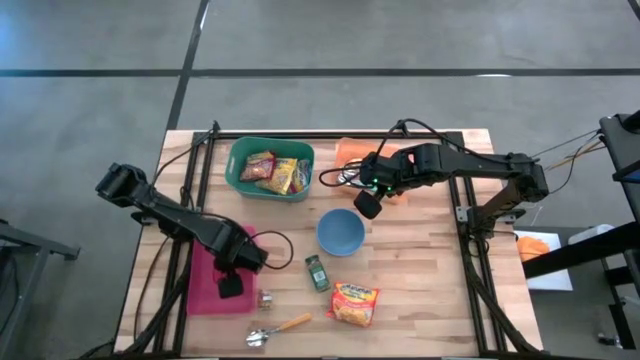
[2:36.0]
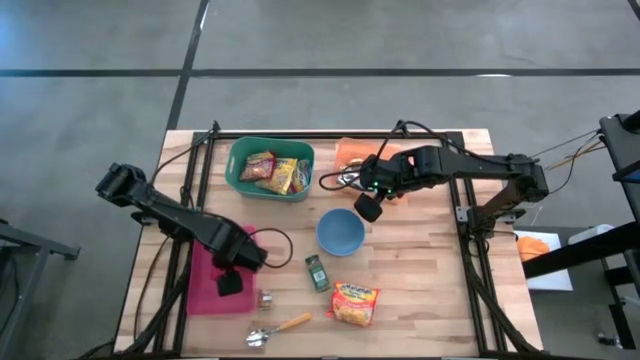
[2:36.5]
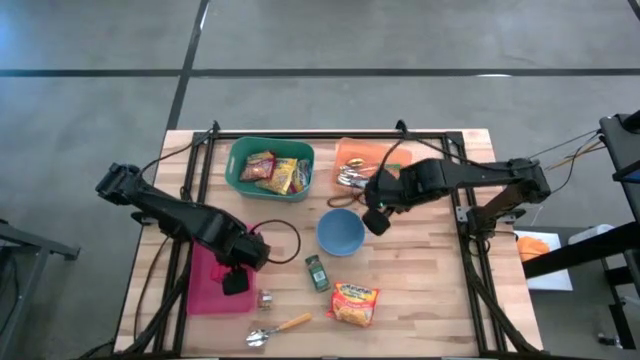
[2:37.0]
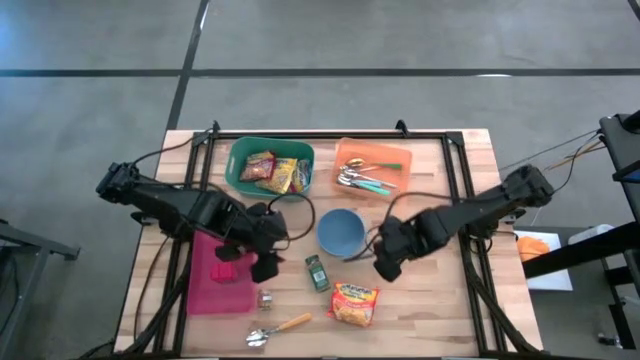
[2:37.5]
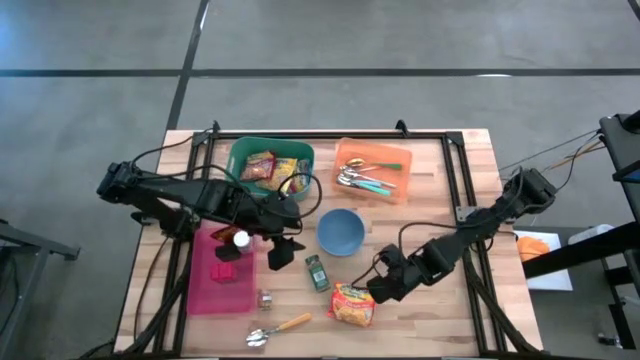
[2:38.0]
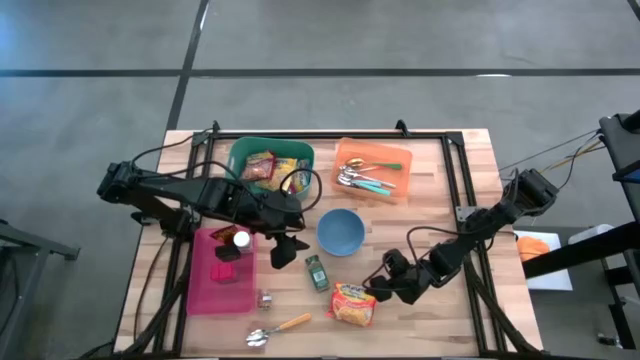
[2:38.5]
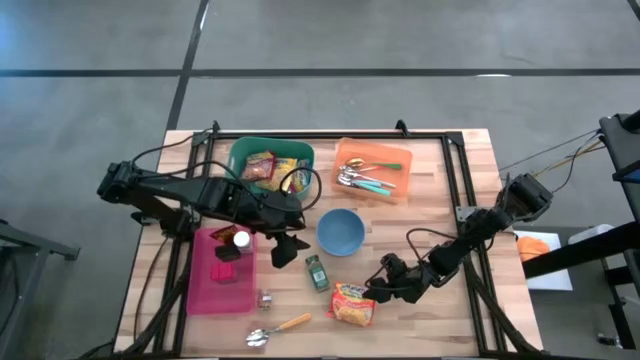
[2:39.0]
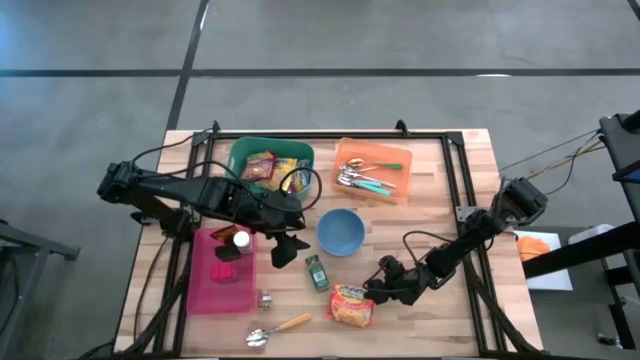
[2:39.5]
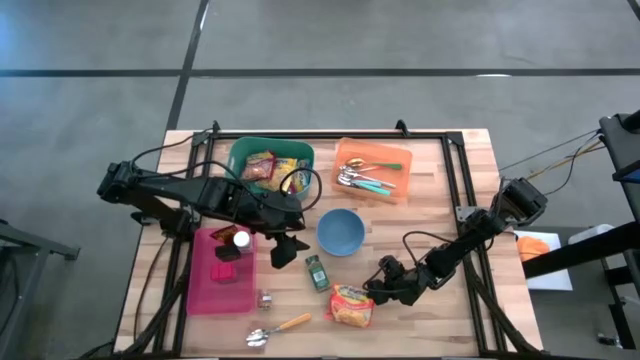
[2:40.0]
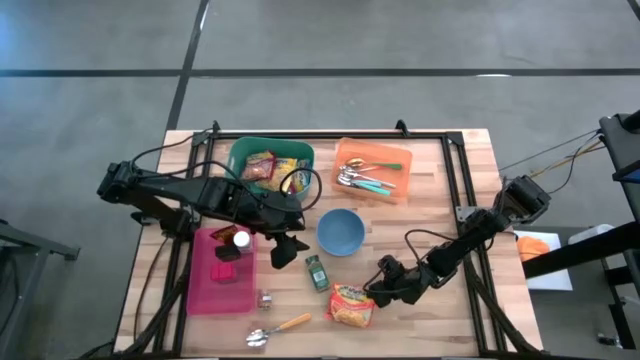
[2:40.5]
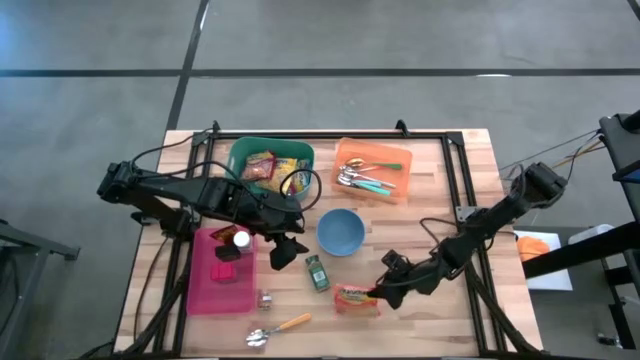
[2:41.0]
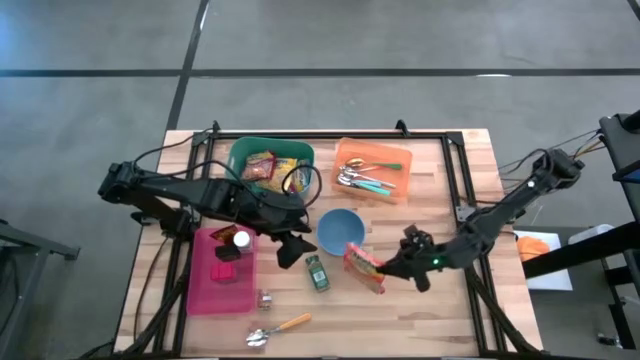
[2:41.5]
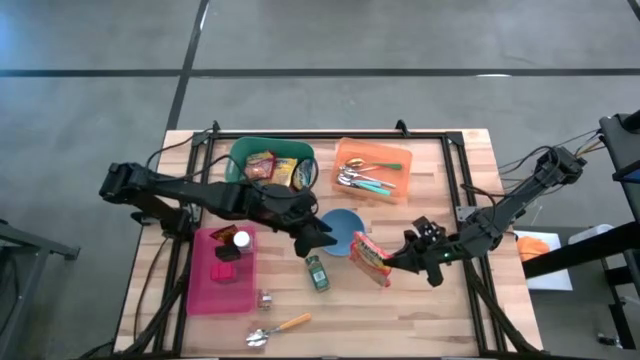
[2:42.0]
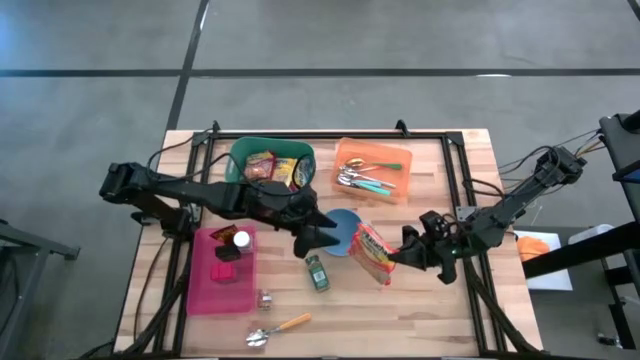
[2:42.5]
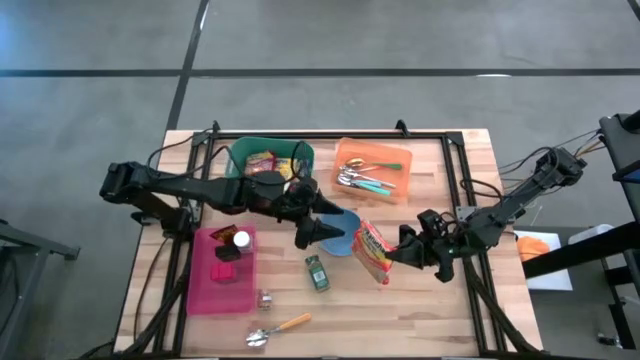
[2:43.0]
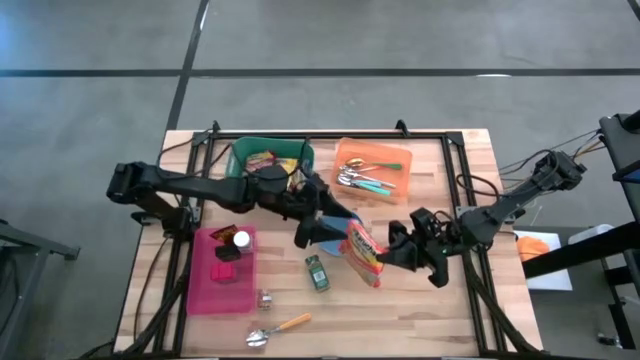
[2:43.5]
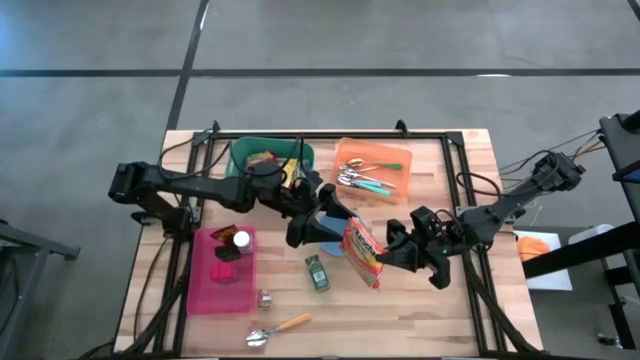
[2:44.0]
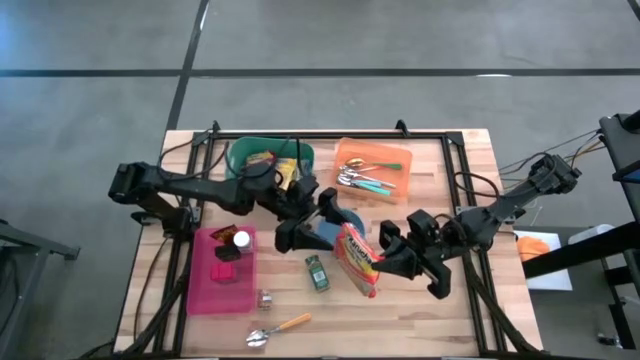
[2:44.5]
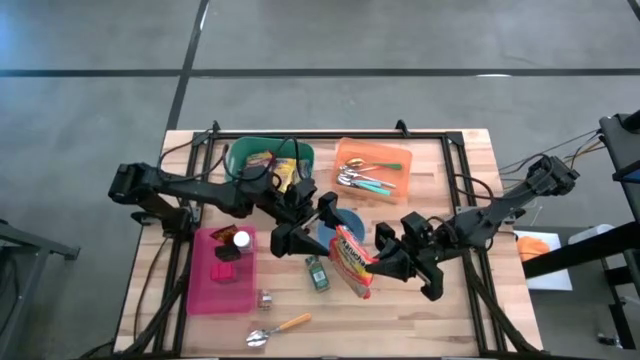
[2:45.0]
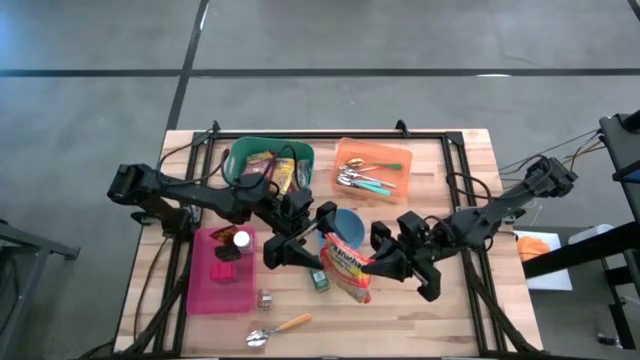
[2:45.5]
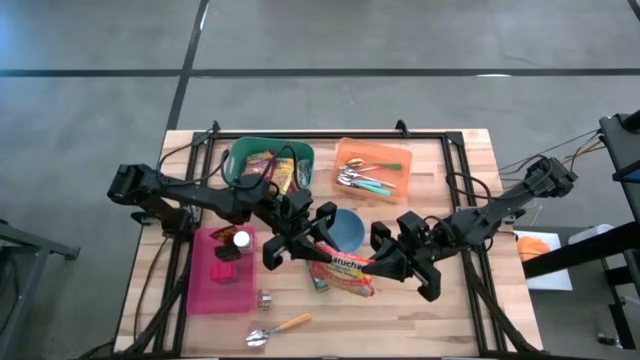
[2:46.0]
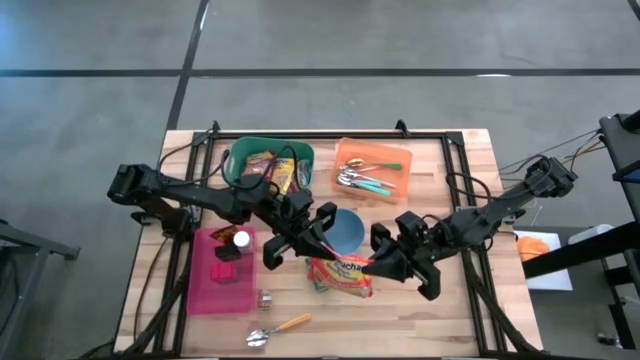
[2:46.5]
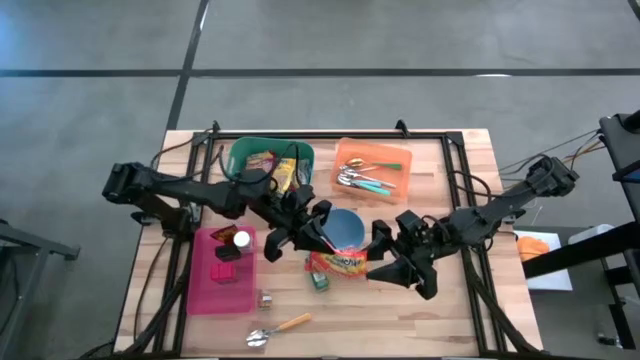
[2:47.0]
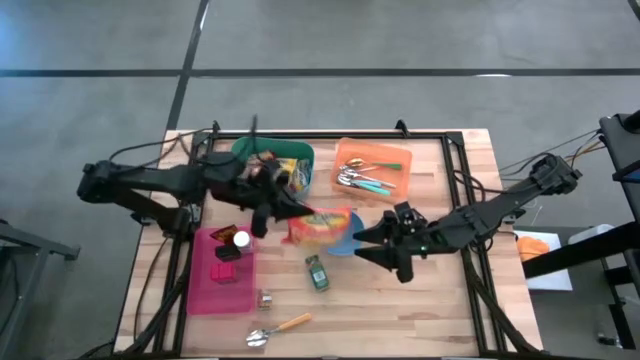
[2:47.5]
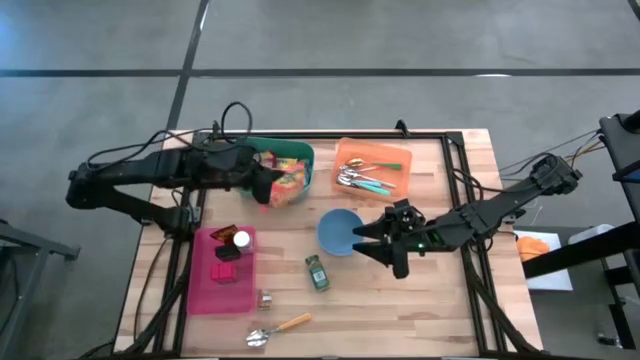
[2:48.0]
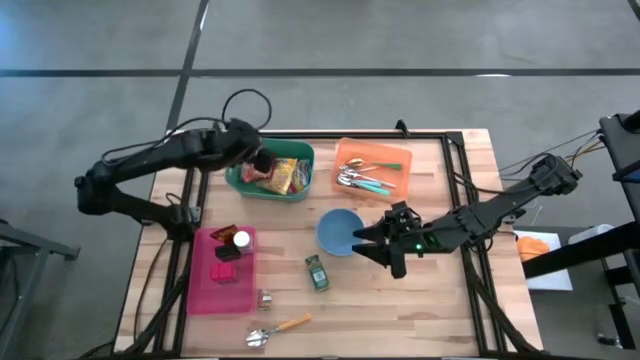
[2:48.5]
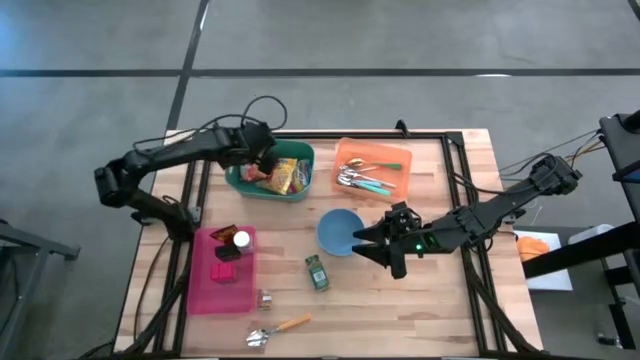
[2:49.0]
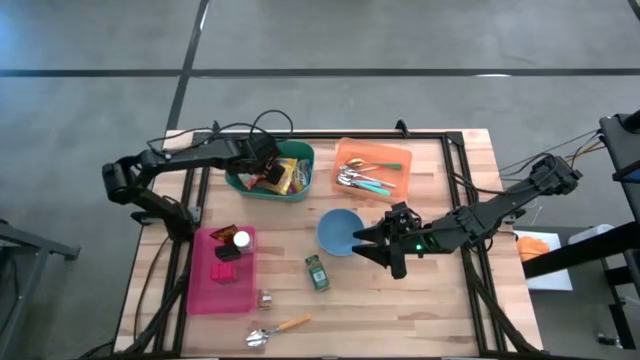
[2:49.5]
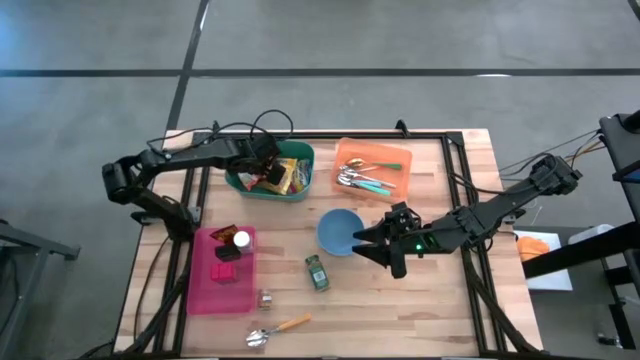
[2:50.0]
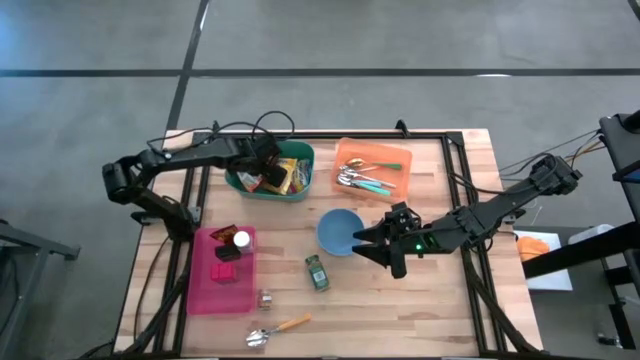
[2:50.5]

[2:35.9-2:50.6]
Put the orange noodle pack into the green bin

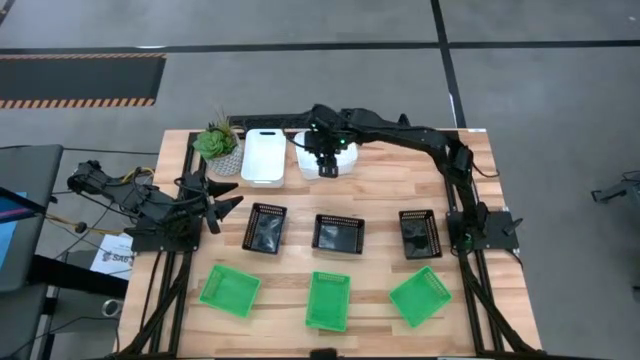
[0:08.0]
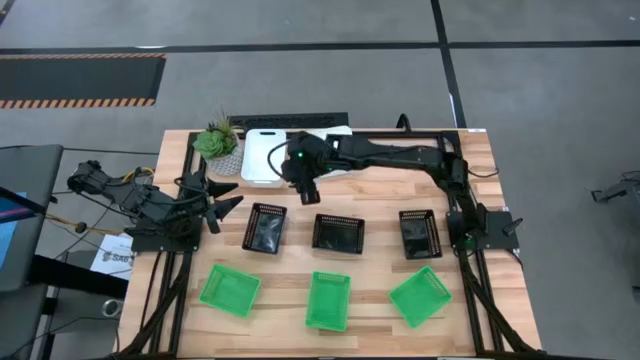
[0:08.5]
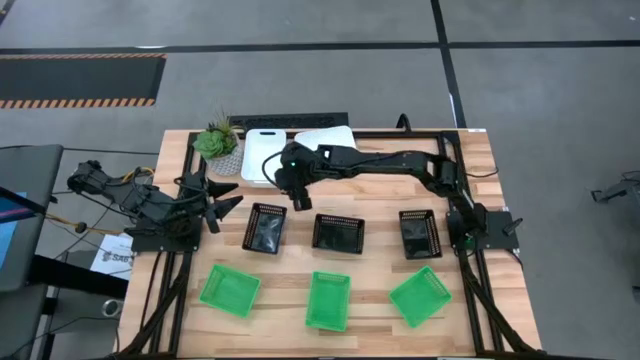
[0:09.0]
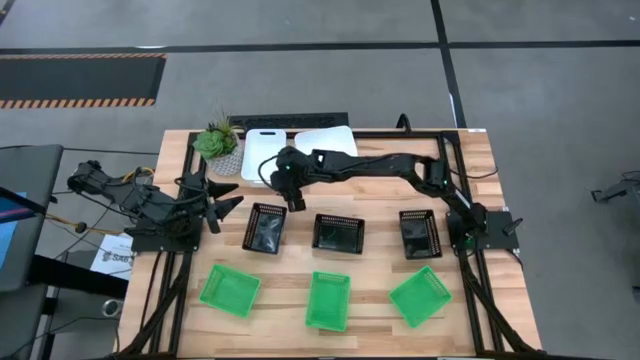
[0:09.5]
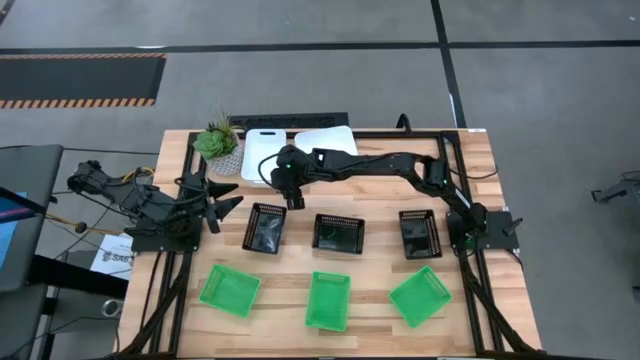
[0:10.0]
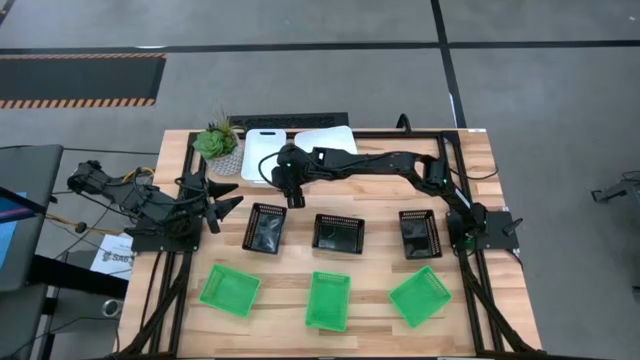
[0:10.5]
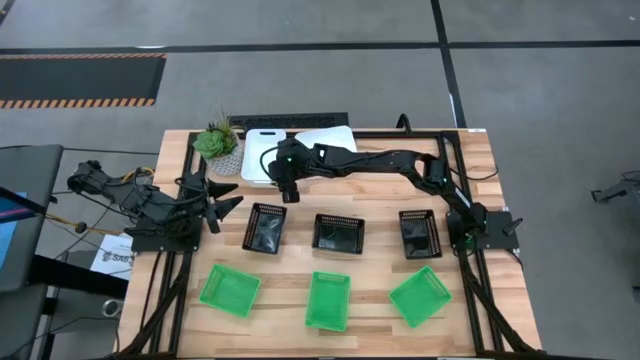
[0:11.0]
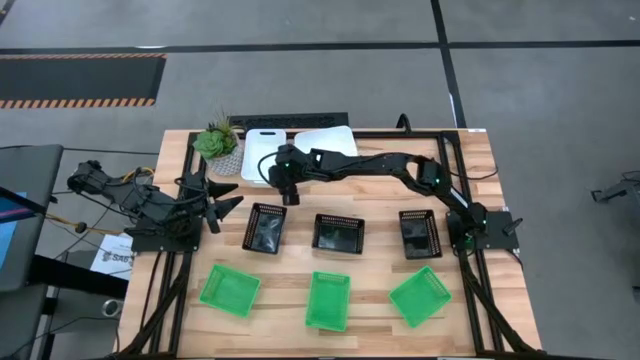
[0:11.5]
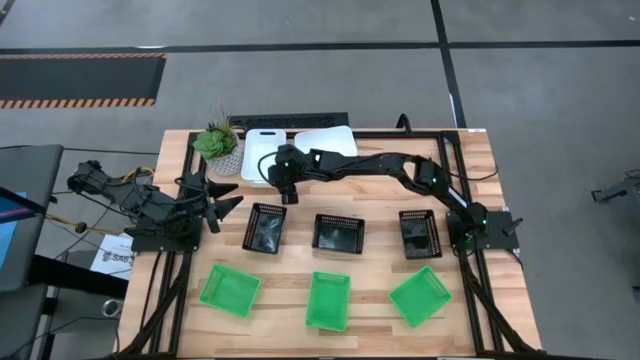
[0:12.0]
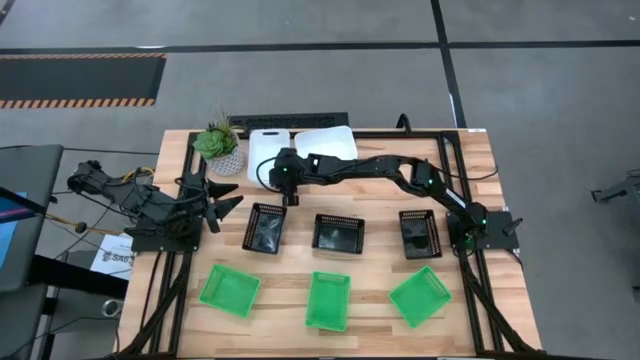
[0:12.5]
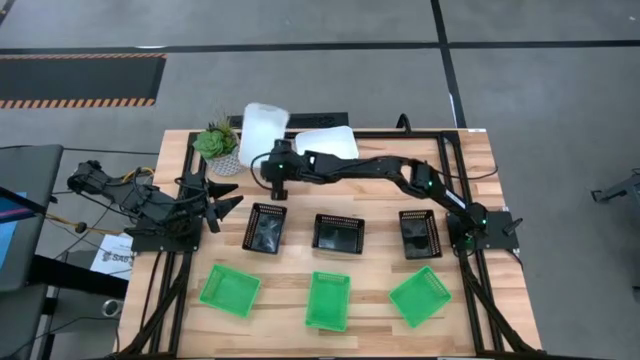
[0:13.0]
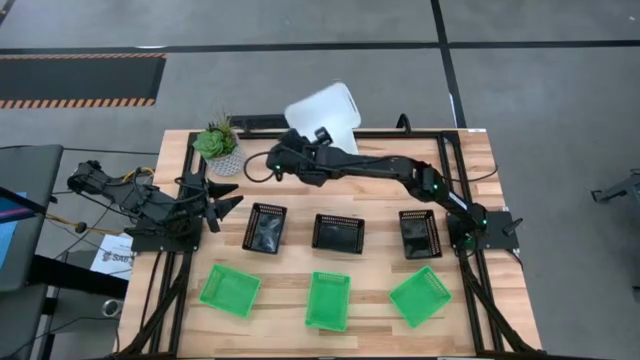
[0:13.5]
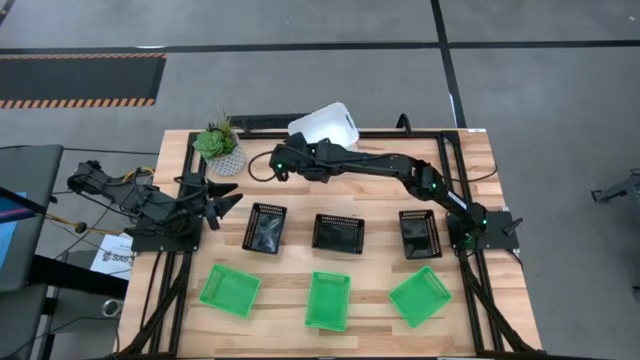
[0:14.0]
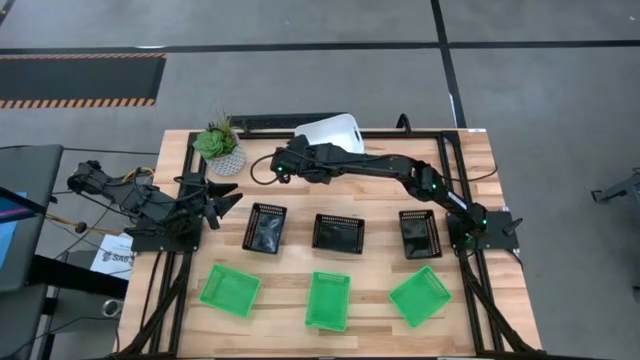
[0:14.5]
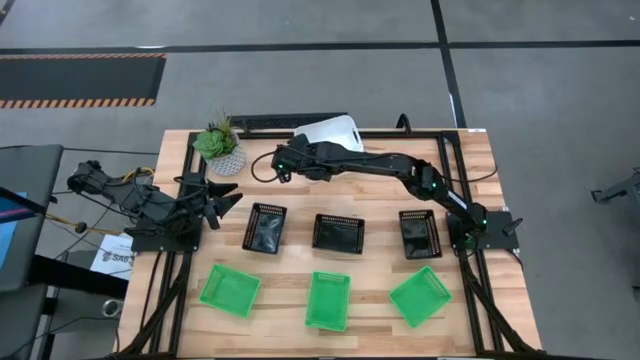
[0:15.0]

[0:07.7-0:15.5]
Stack the left white bin on top of the white bin
